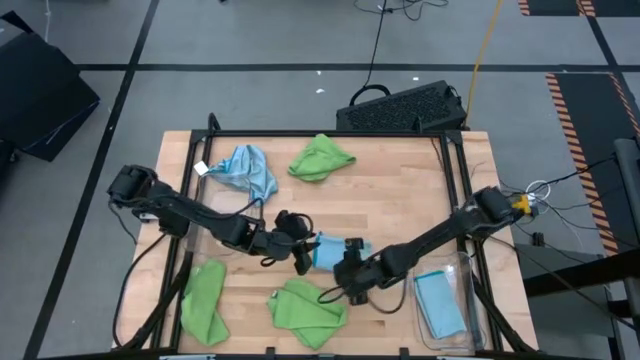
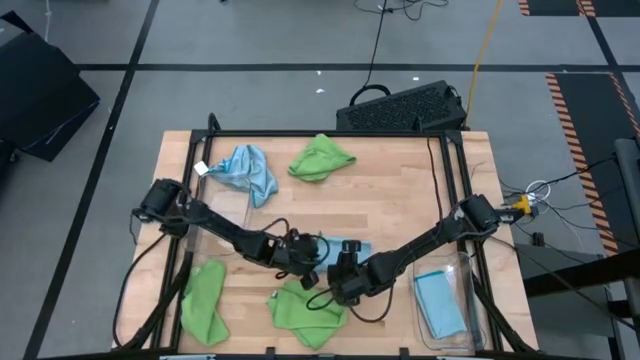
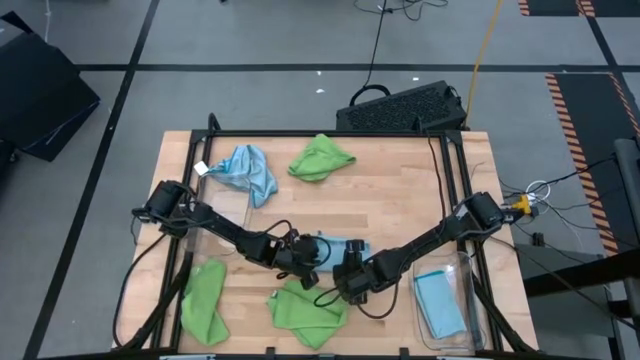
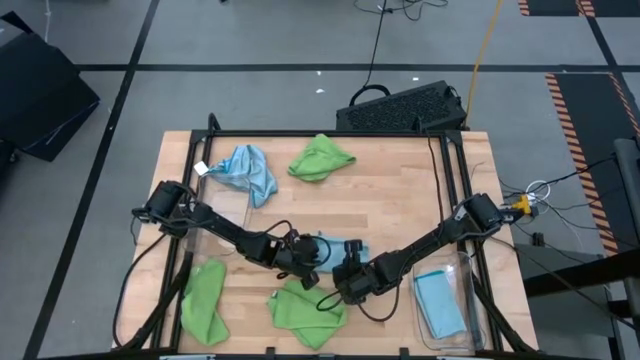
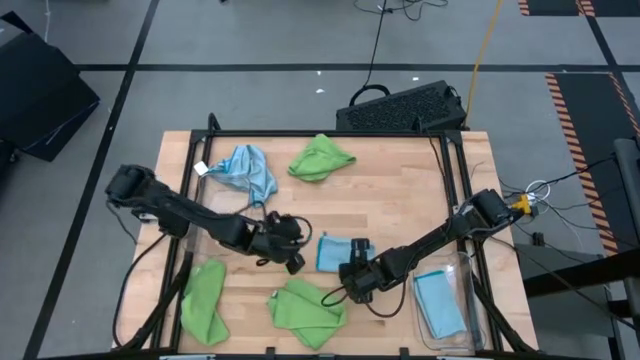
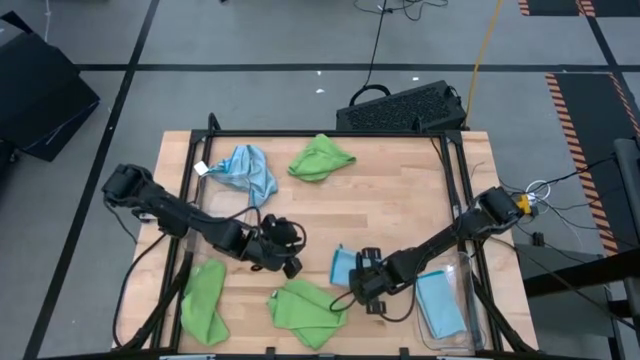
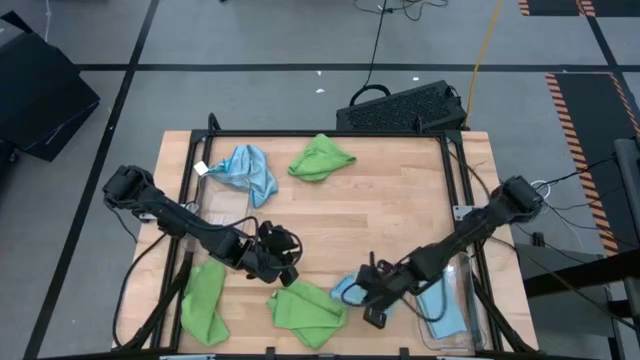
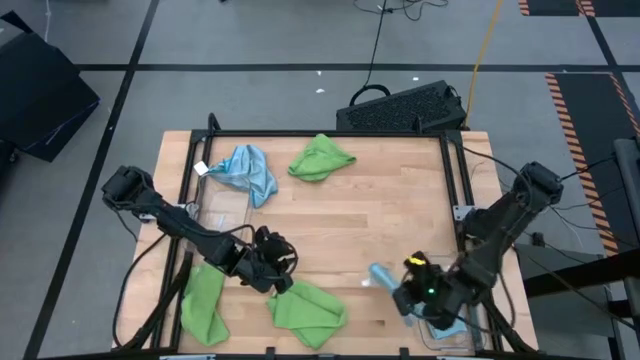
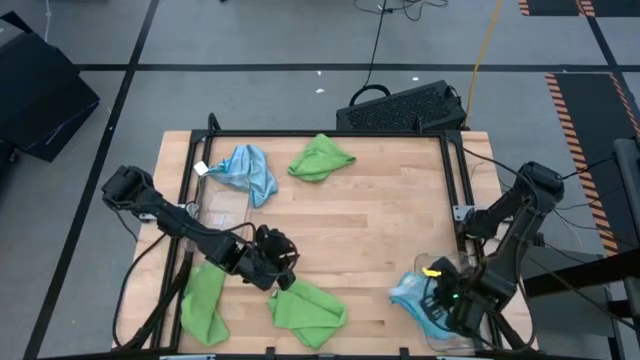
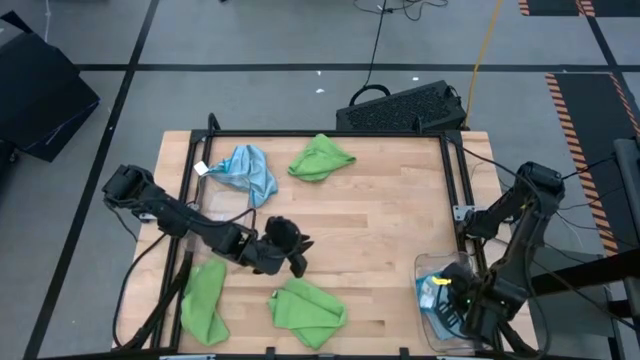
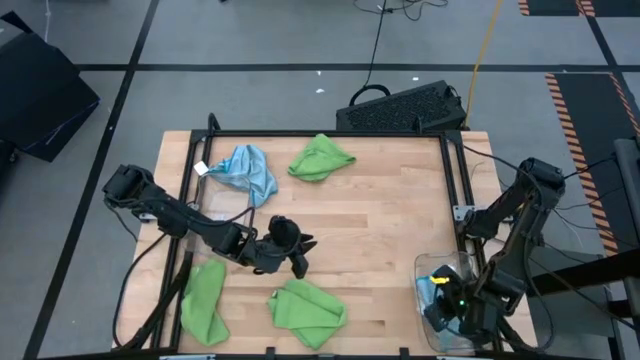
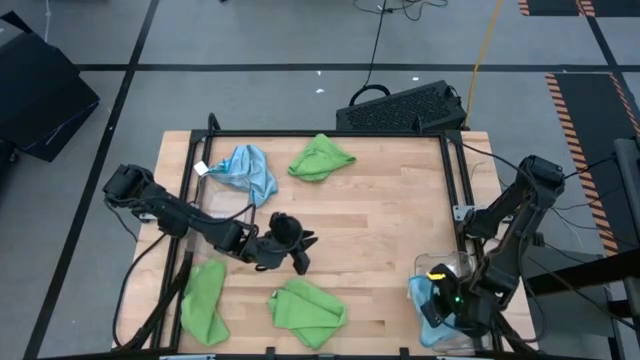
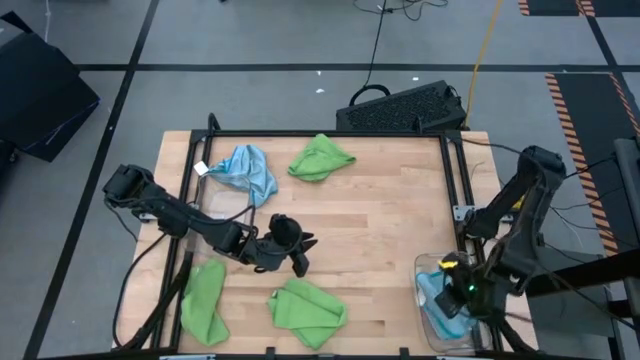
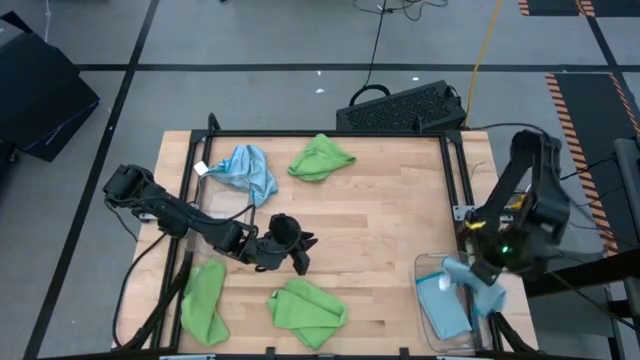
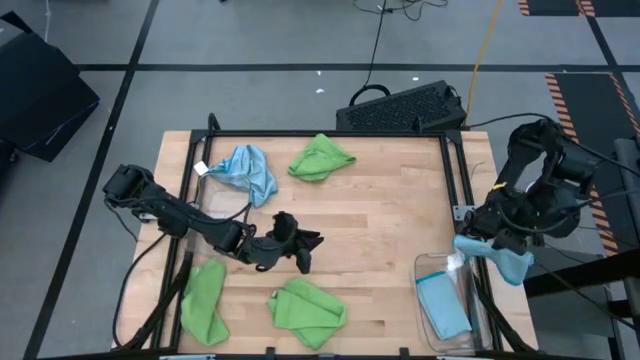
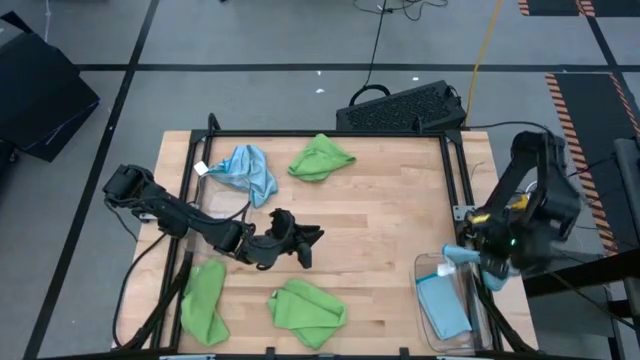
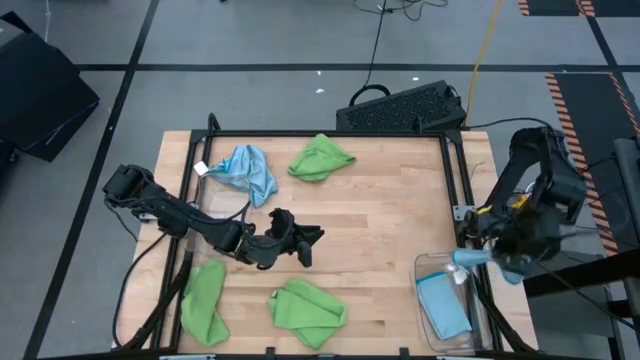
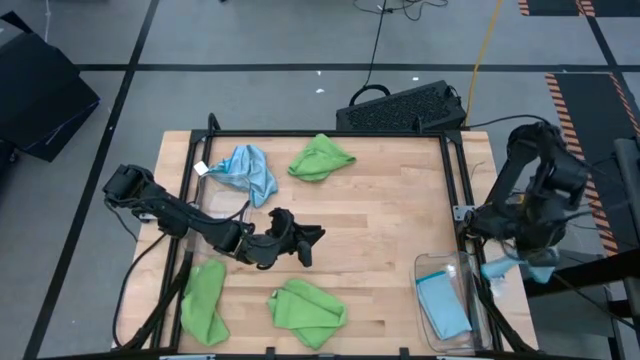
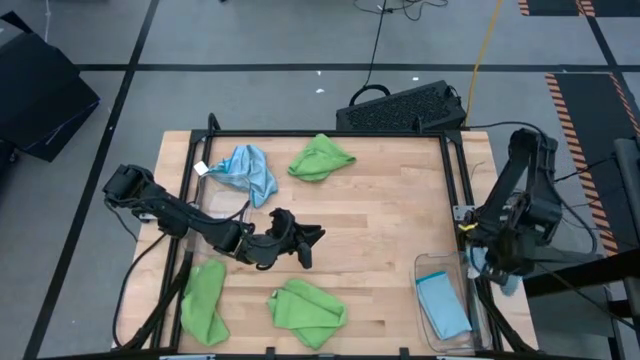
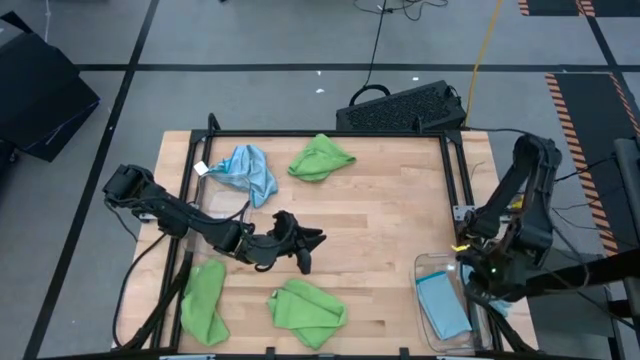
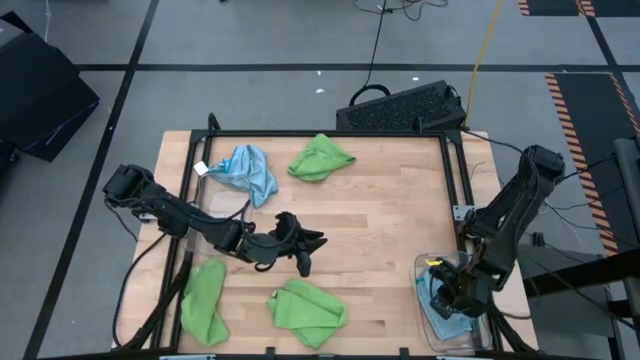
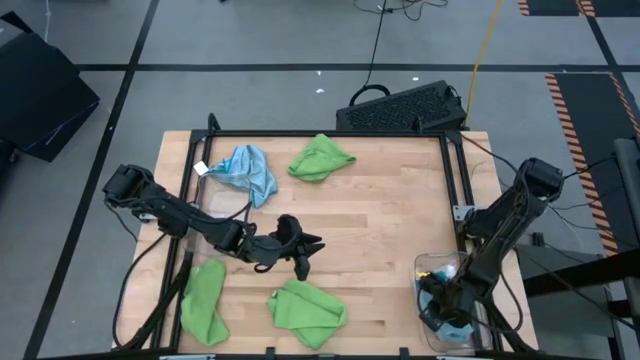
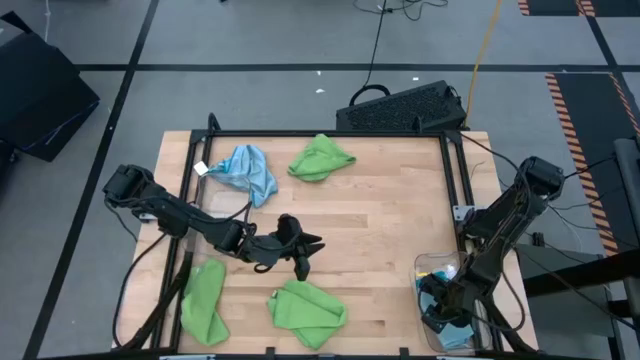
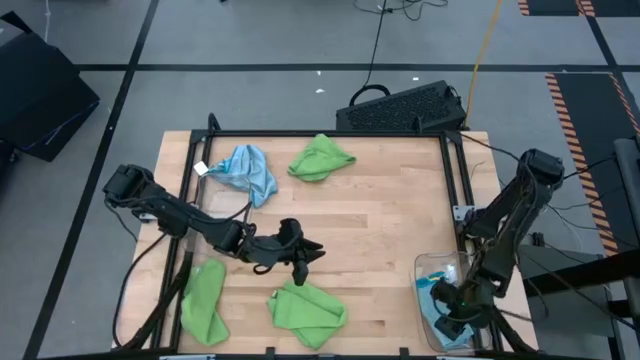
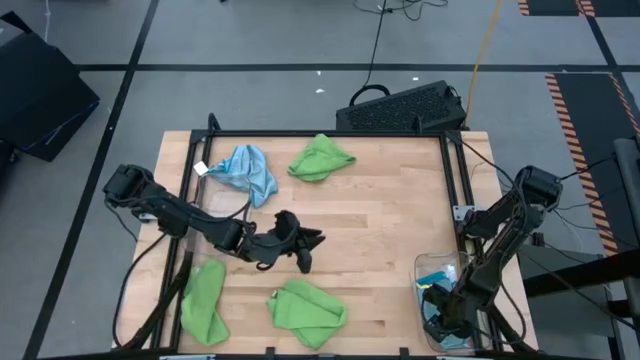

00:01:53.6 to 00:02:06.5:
Task: Sort microfiber towel by color & place in baskets
Put the folded blue microfiber towel into the right transparent bin

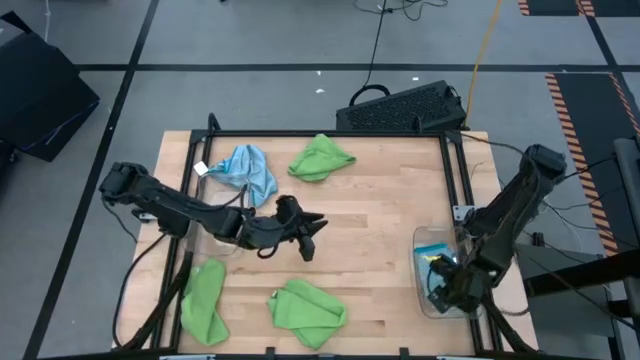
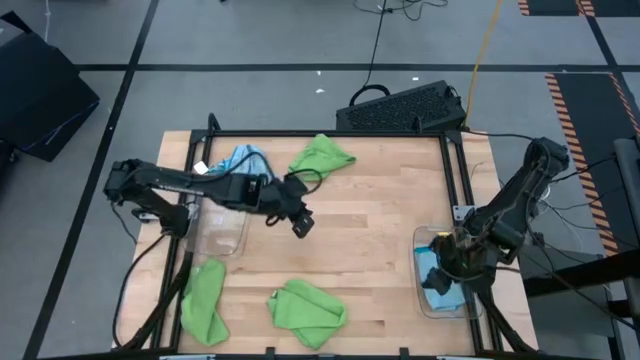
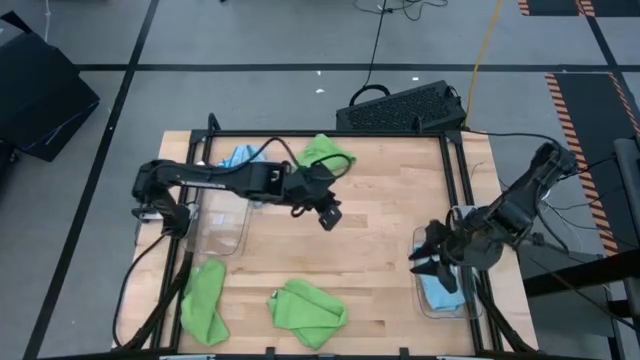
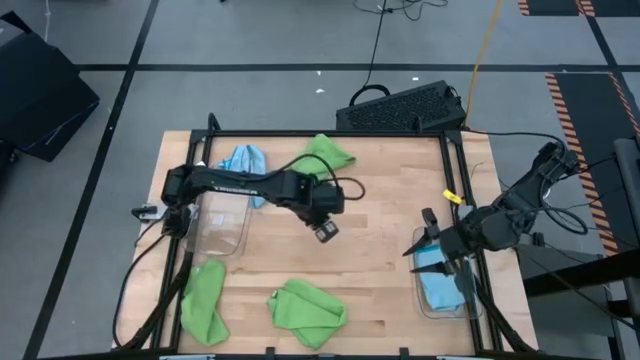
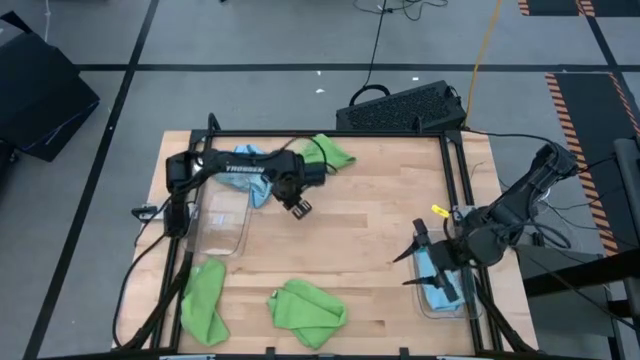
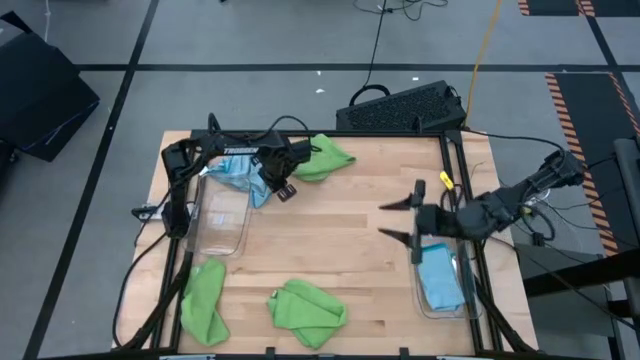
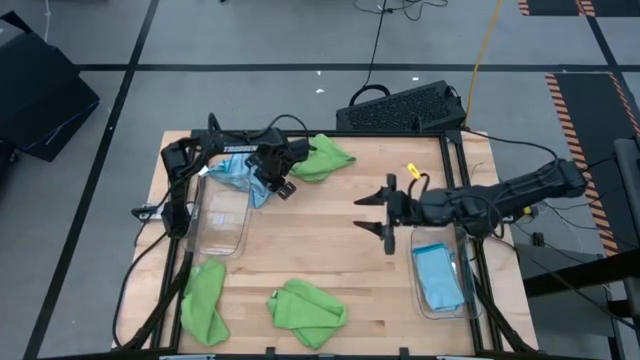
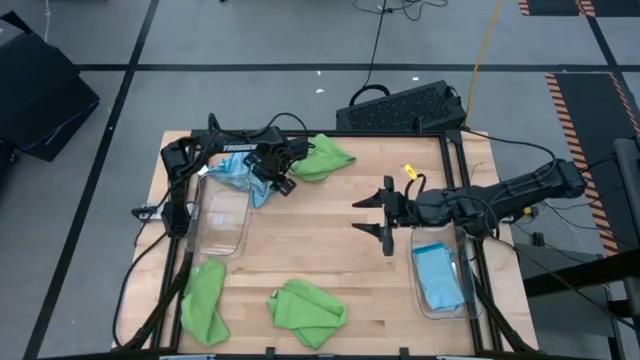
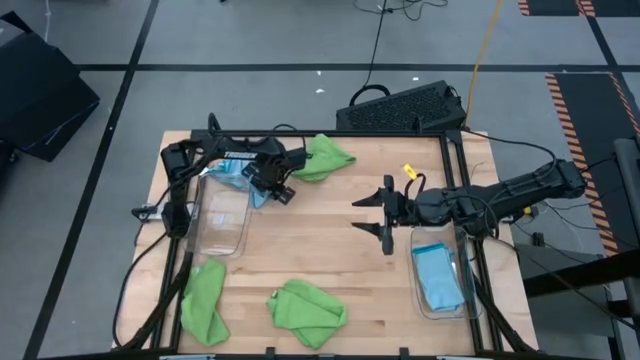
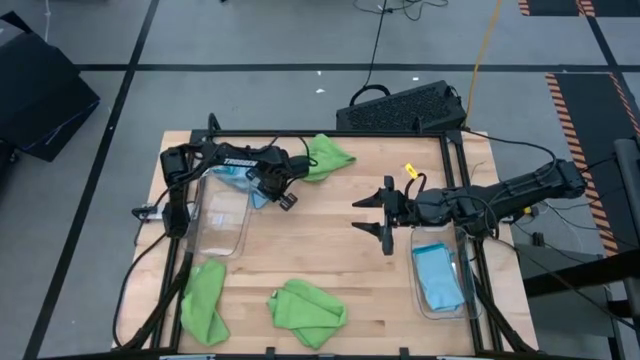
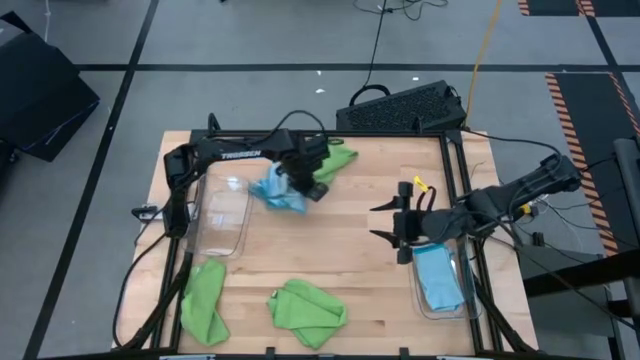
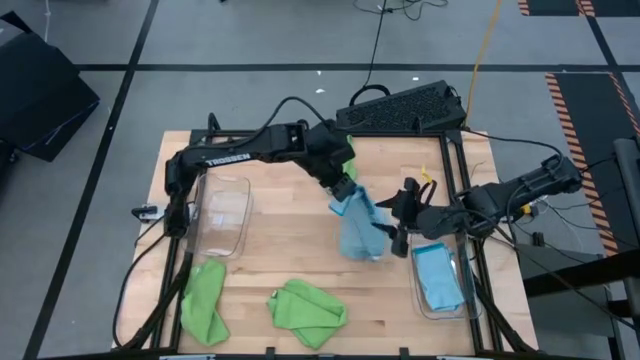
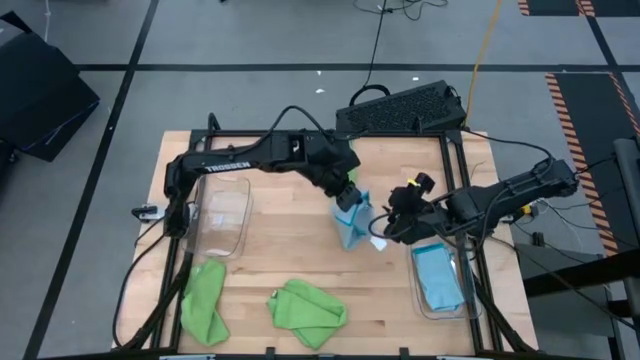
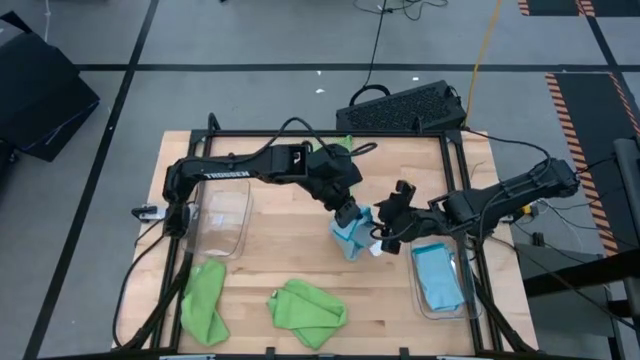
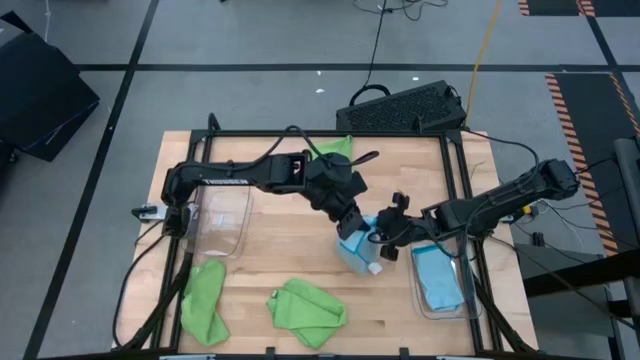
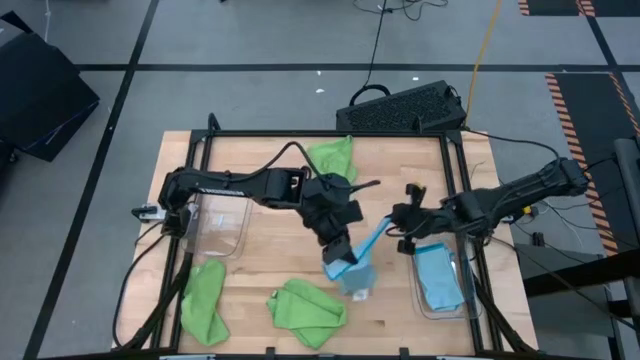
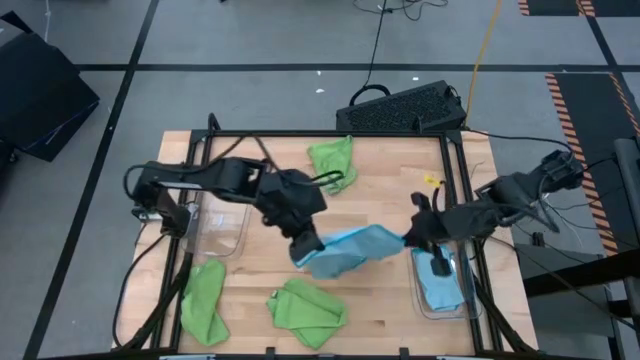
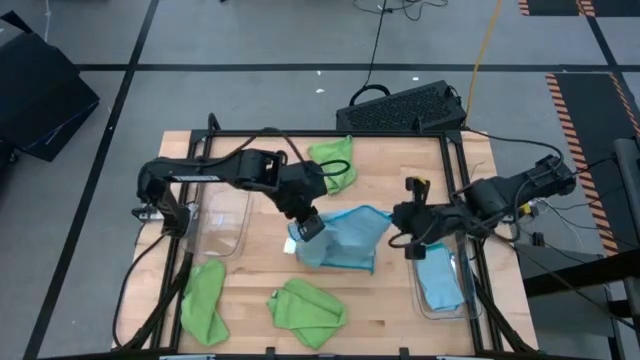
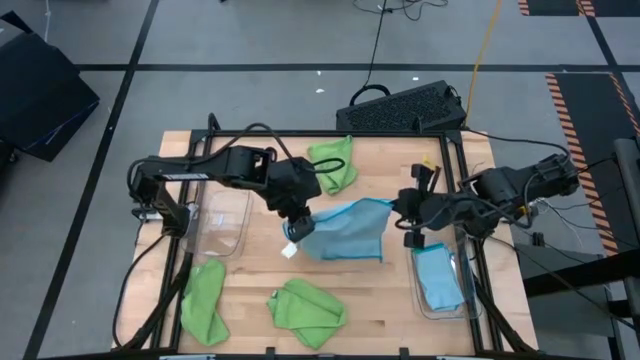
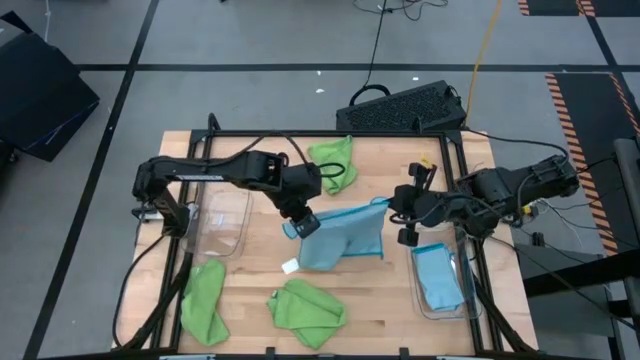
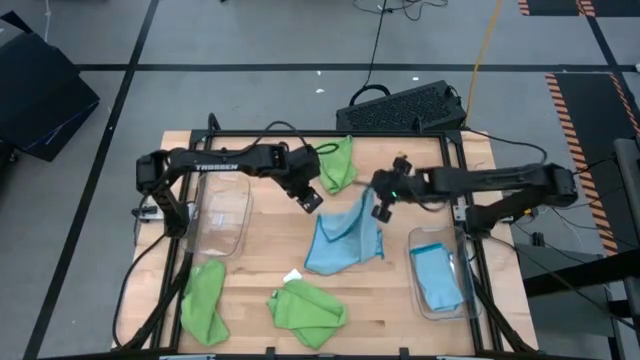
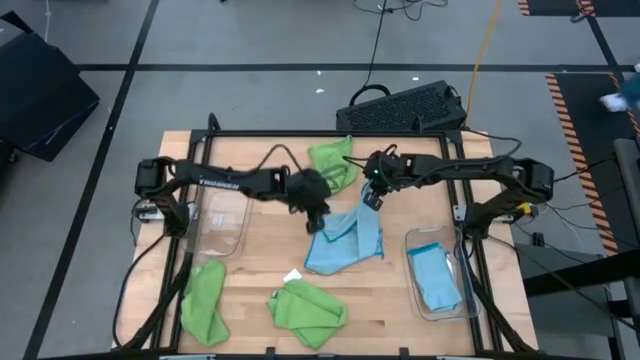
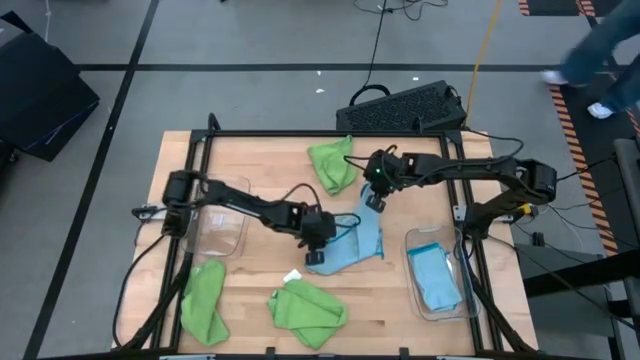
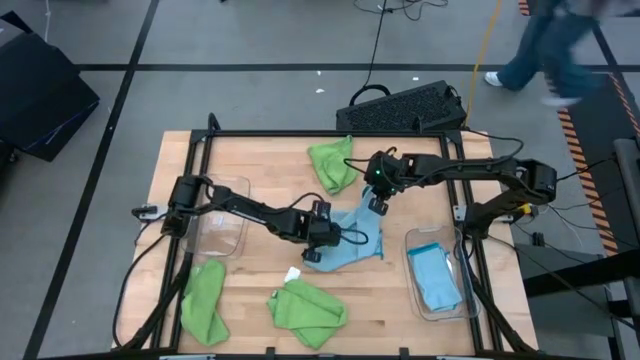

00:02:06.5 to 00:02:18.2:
Fold the blue microfiber towel
